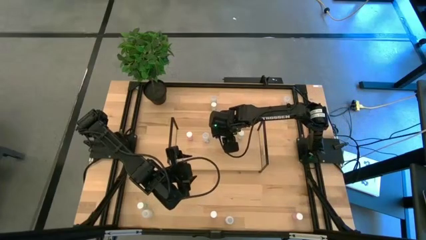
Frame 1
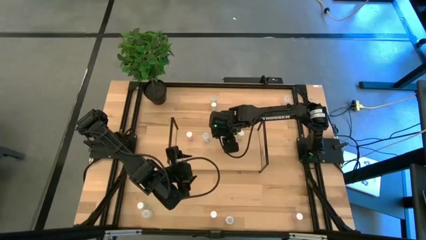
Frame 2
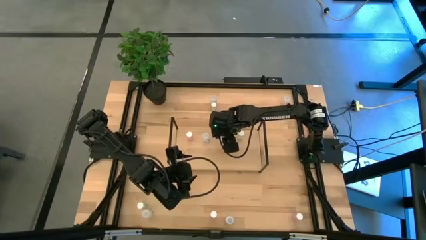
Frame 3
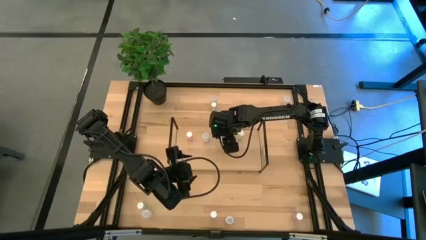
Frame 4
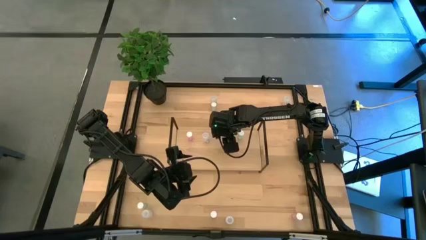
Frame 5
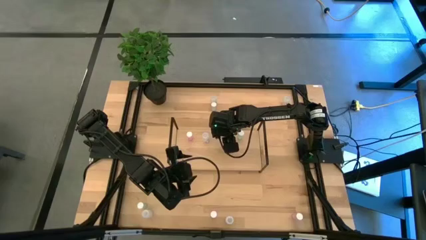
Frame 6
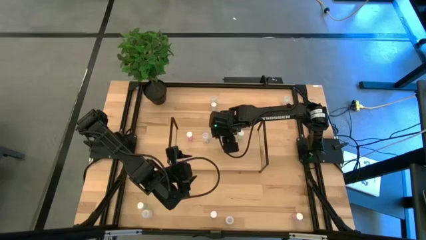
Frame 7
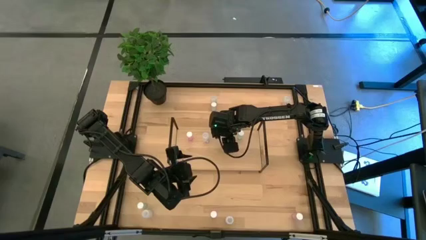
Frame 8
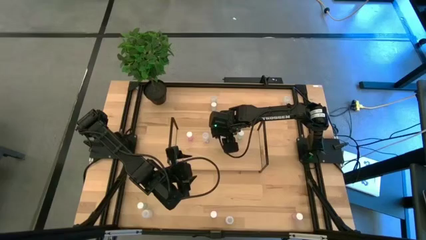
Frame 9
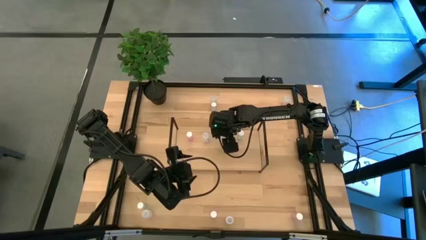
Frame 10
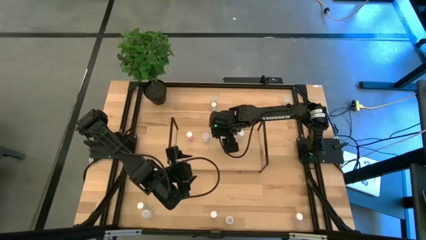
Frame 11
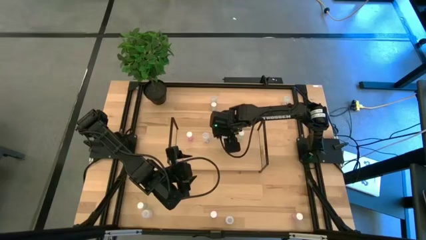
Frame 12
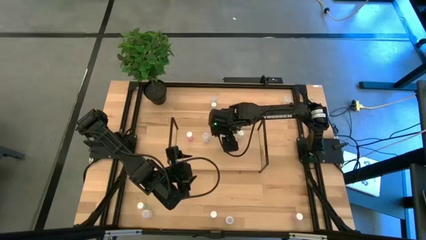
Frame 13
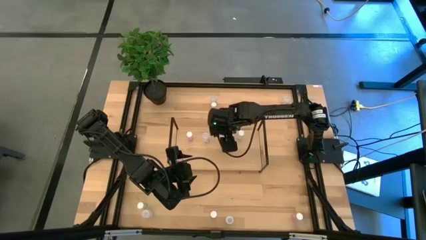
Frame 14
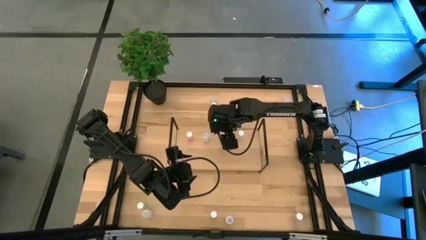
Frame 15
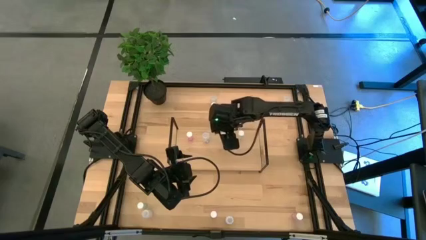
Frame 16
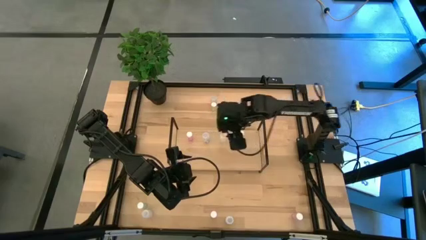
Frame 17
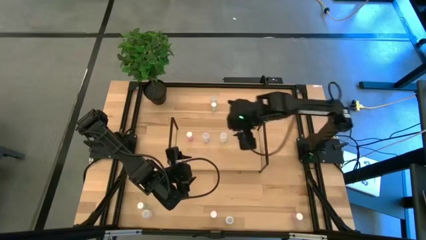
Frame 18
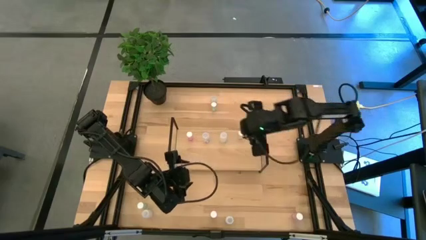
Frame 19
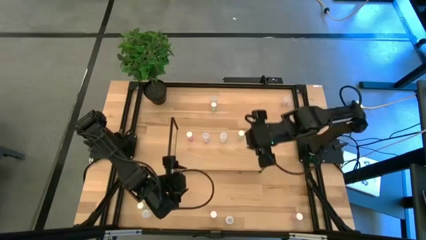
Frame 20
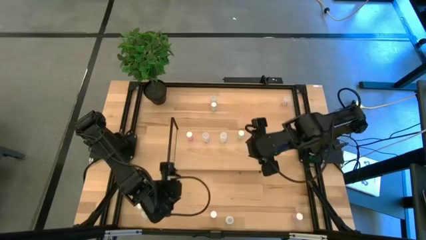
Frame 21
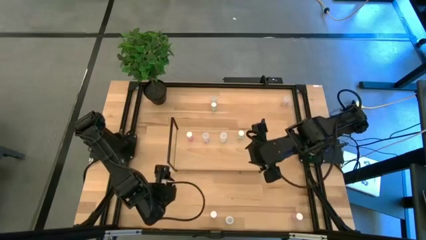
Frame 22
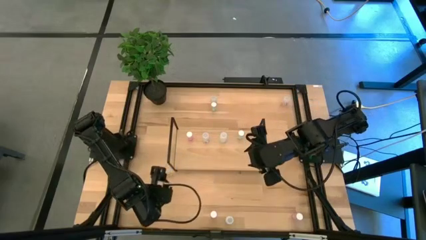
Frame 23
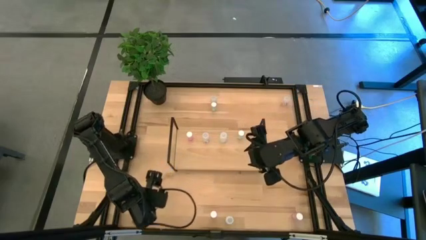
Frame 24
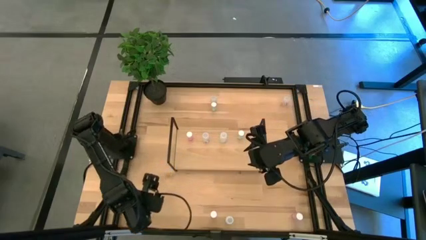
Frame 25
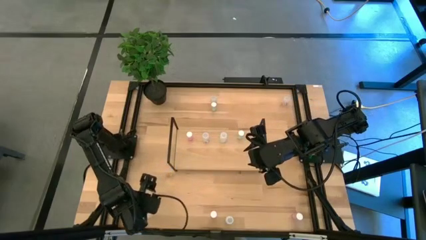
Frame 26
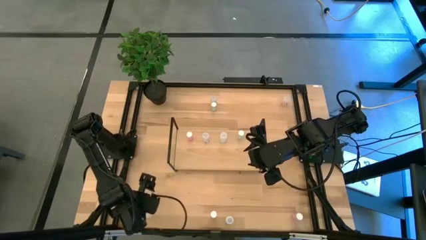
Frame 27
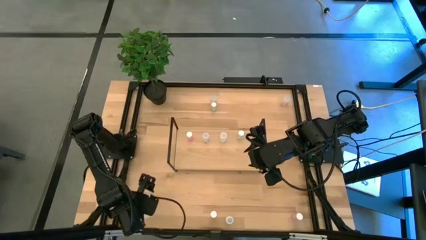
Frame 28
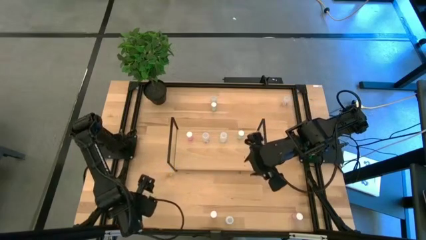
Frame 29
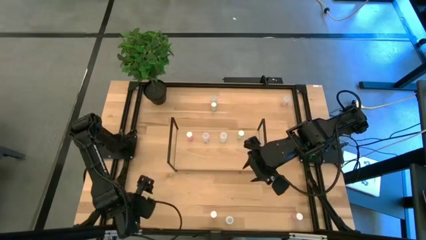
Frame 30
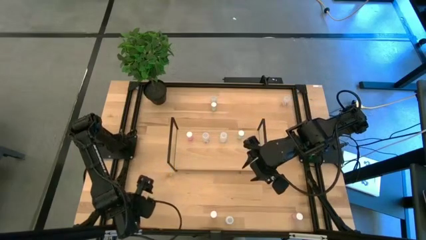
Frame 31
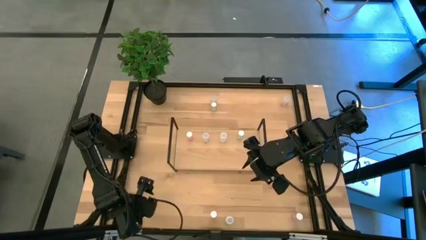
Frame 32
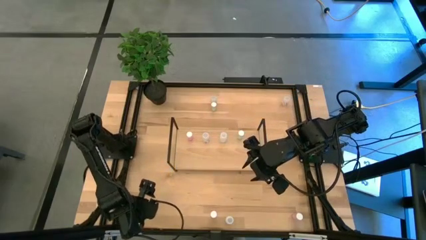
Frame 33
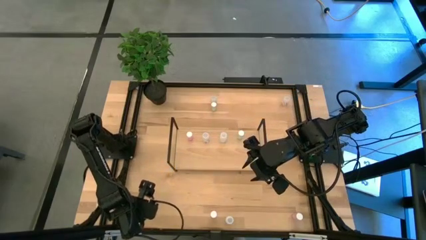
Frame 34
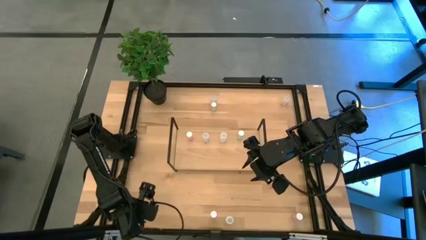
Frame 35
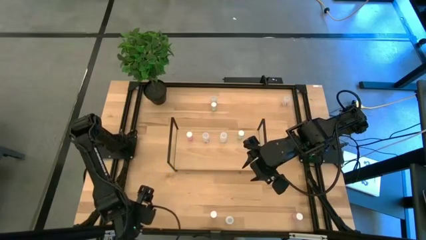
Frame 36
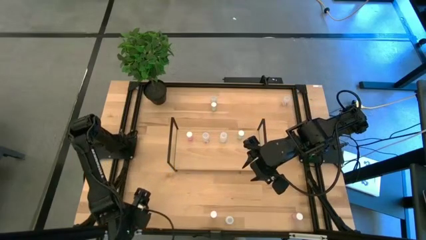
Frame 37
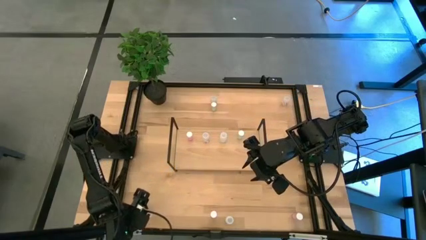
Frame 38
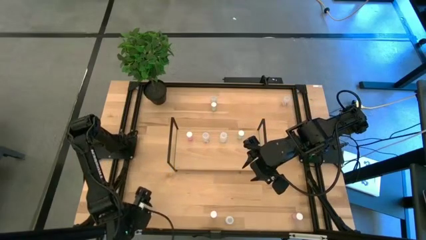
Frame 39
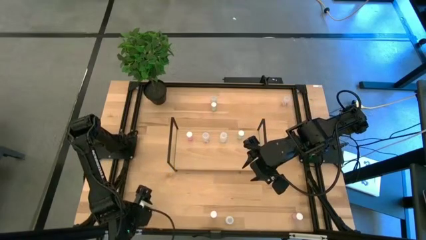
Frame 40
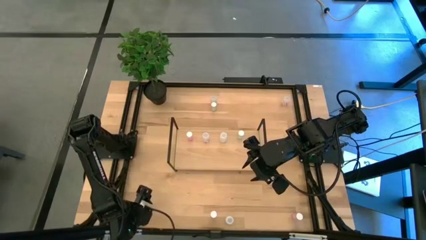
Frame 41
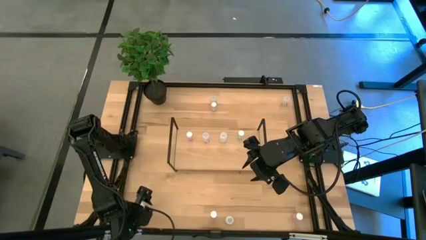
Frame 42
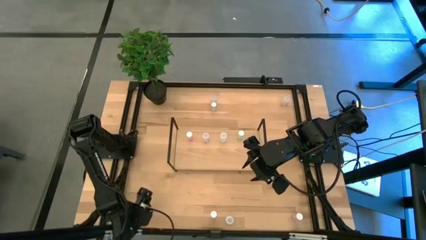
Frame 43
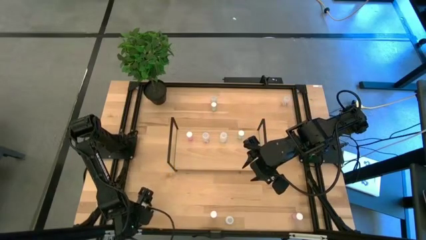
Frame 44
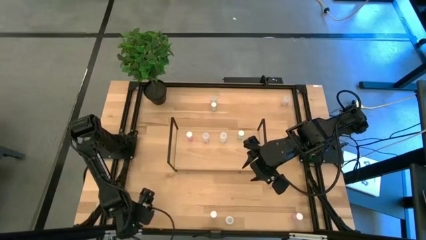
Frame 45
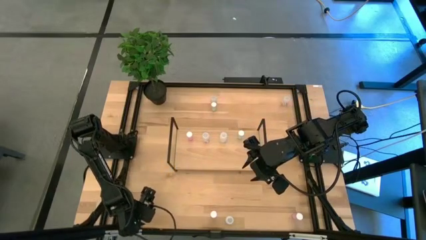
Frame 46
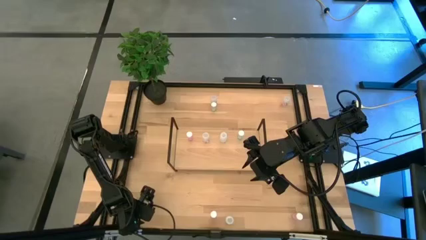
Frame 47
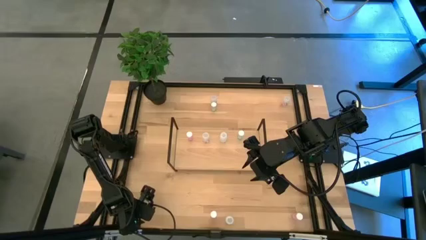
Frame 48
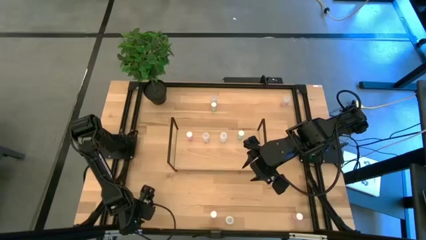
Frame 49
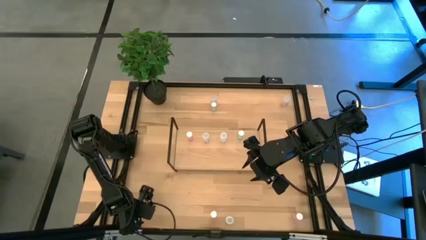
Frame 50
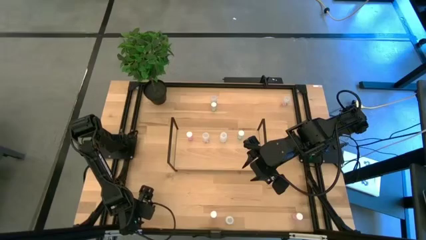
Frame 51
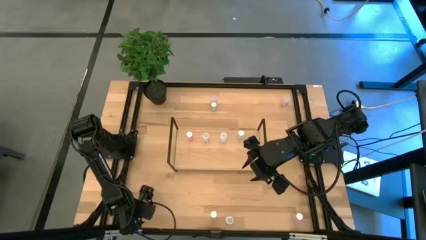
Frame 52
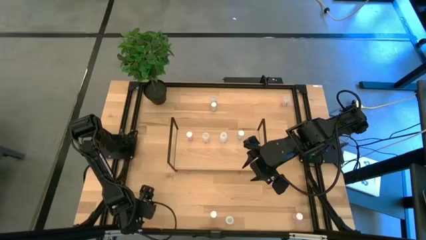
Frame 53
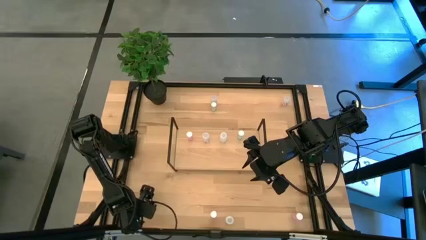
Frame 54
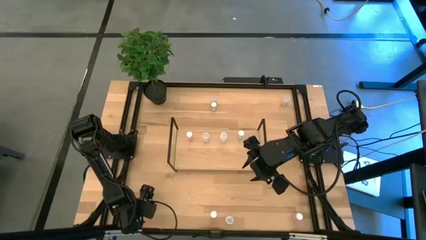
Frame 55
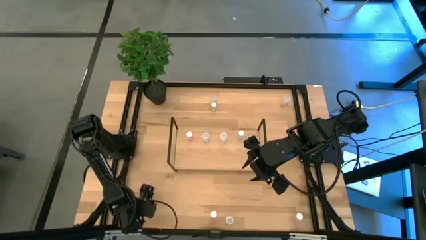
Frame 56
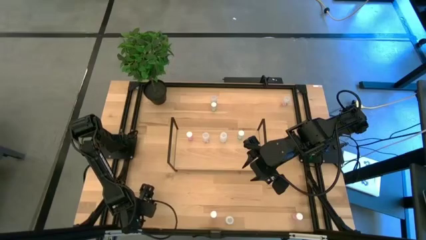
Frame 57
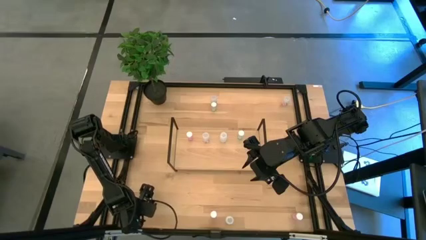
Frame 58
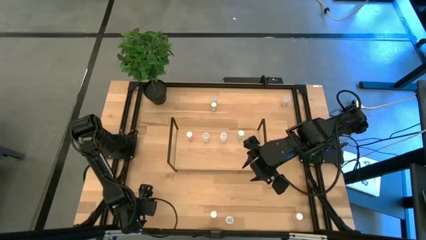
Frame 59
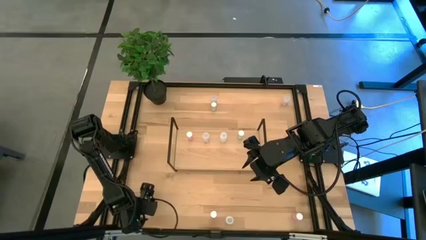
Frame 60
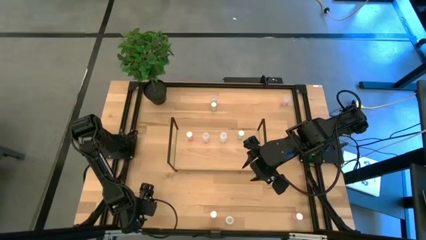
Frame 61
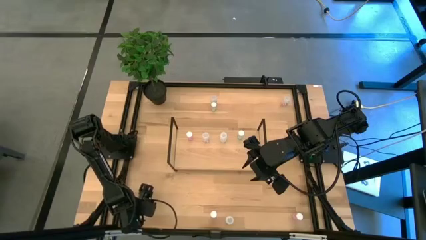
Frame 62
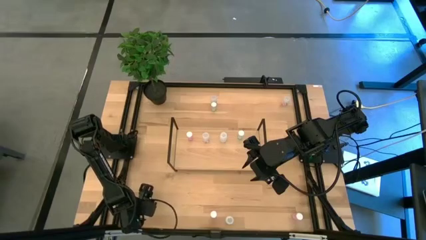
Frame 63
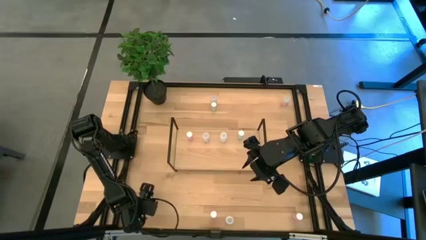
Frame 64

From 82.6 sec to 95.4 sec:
Task: Pick and place medicine bottles onto shelf by color
Put the bottom left white pill bottle on the shelf aligned with the other white pill bottles

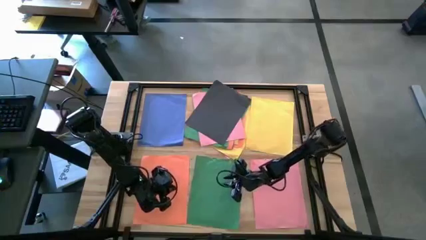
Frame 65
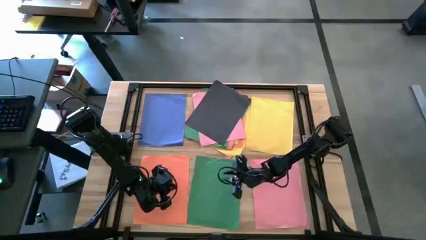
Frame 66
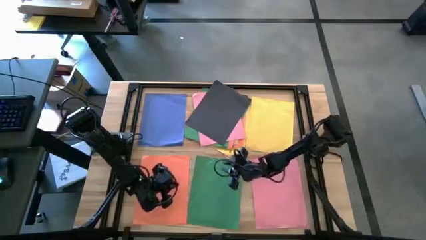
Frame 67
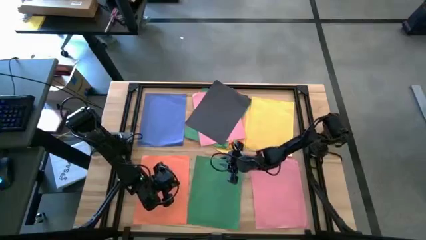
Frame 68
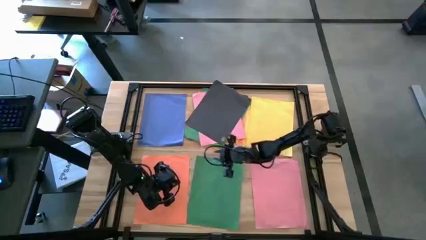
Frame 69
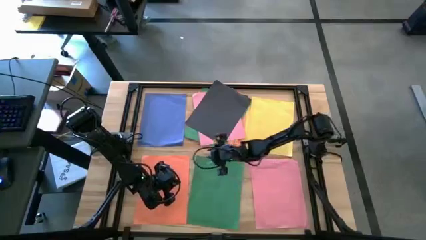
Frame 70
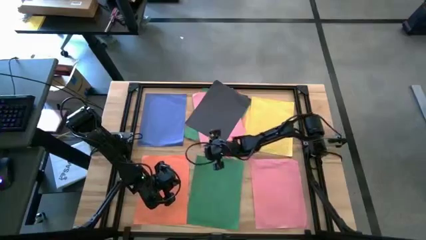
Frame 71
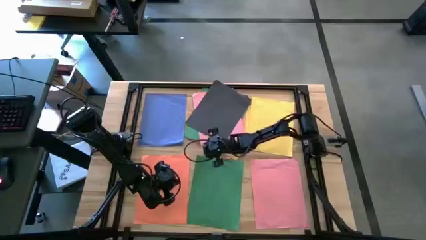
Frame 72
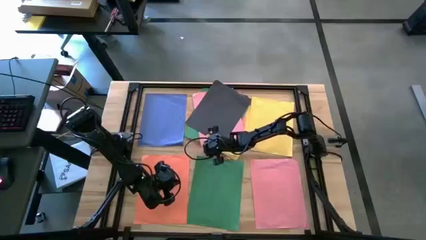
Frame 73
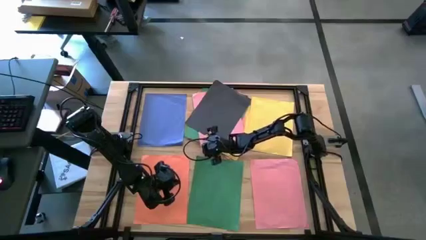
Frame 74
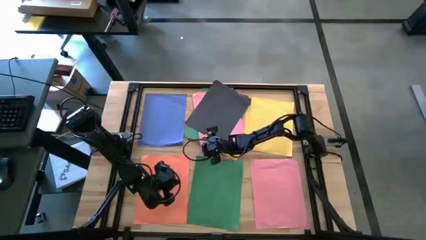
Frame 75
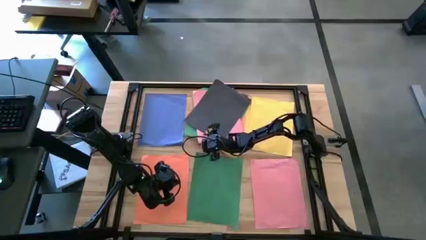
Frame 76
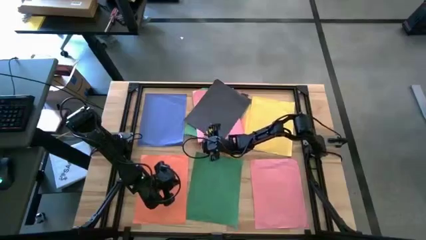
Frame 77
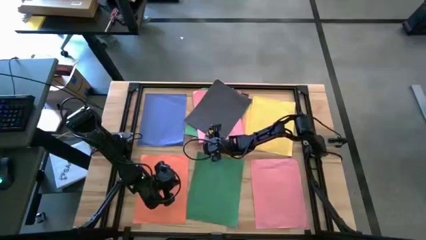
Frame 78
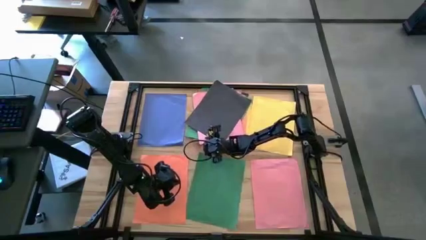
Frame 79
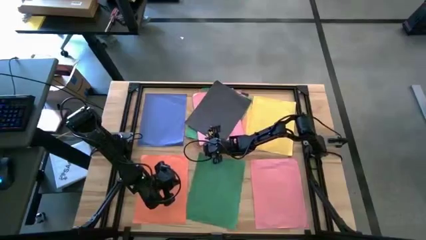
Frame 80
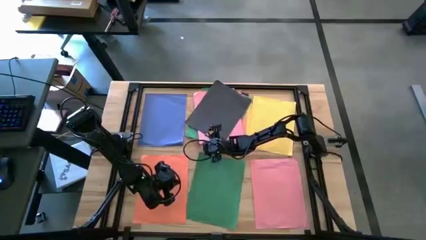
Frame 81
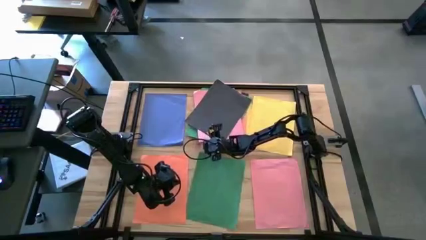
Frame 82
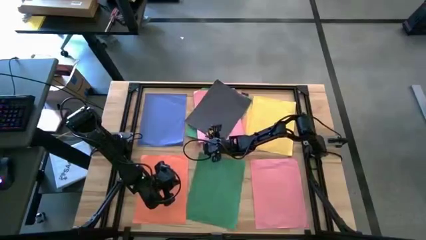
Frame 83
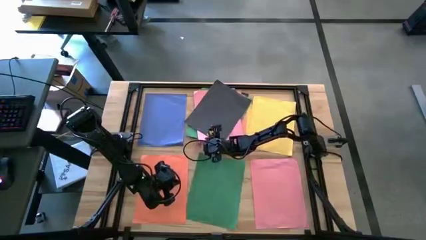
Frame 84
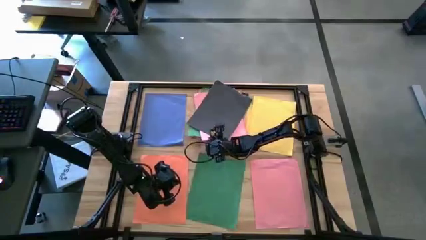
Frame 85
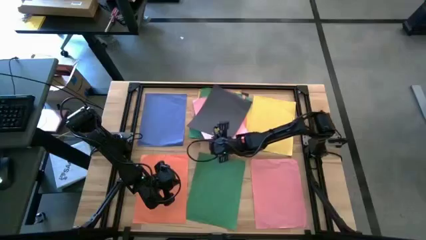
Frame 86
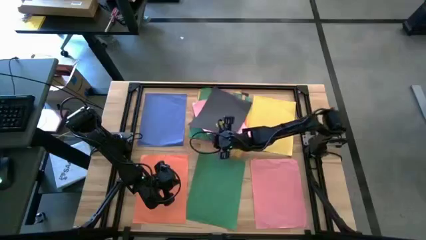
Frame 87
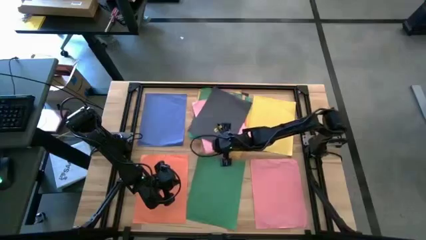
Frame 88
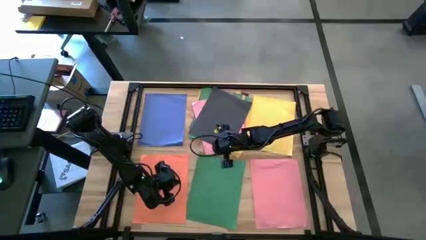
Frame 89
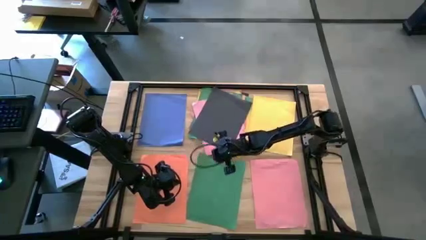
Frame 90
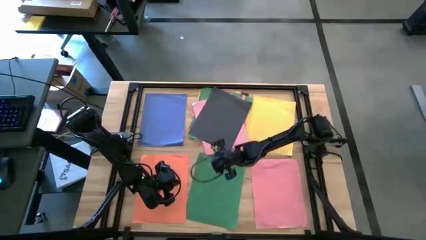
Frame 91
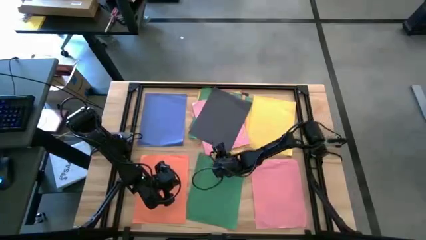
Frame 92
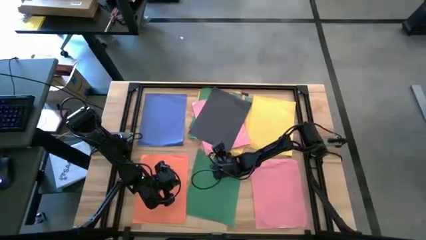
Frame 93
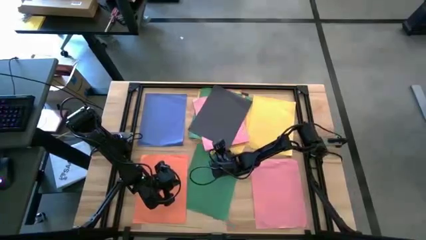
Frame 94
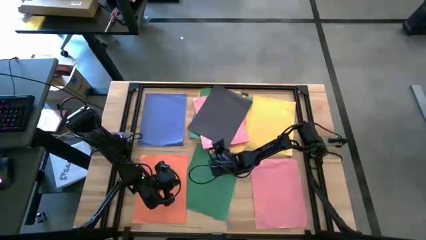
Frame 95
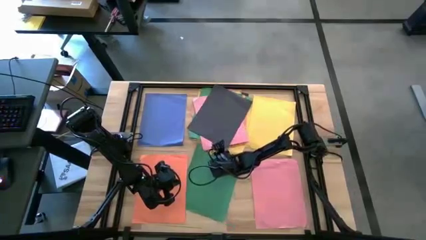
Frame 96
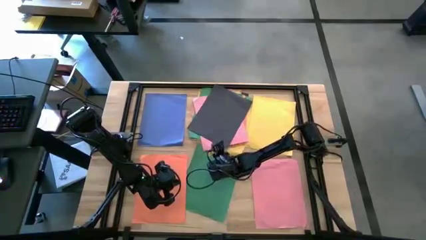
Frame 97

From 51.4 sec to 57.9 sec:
Task: Organize paper
Stack the pink paper under the black paper on the bottom pink paper
